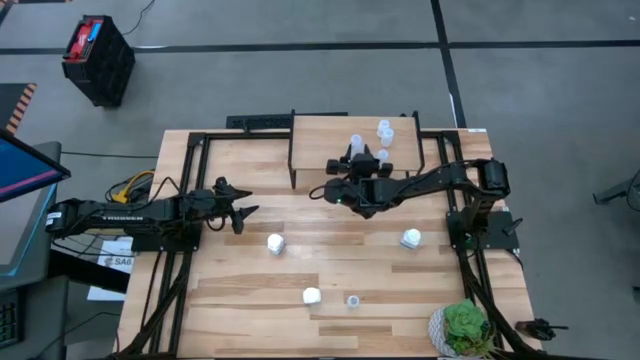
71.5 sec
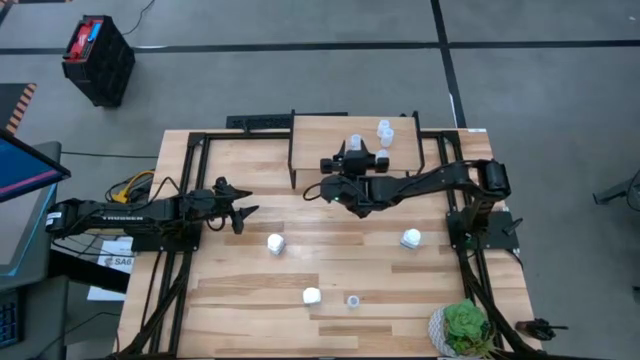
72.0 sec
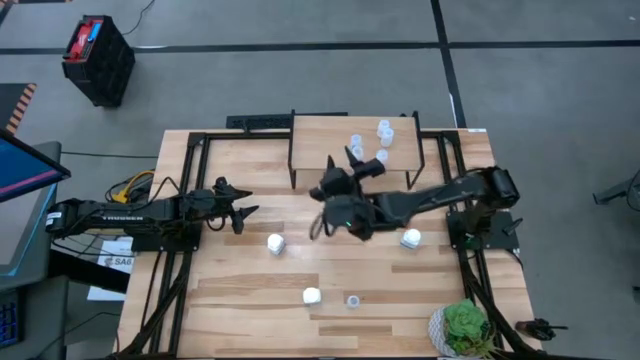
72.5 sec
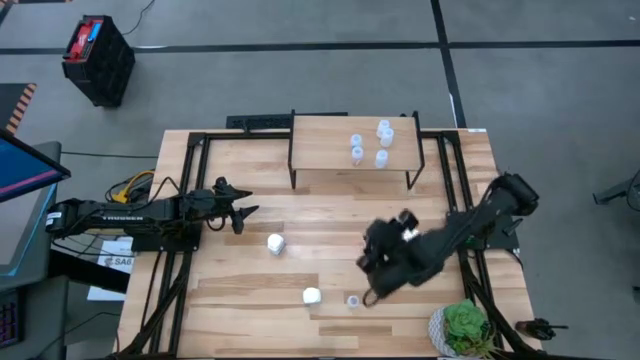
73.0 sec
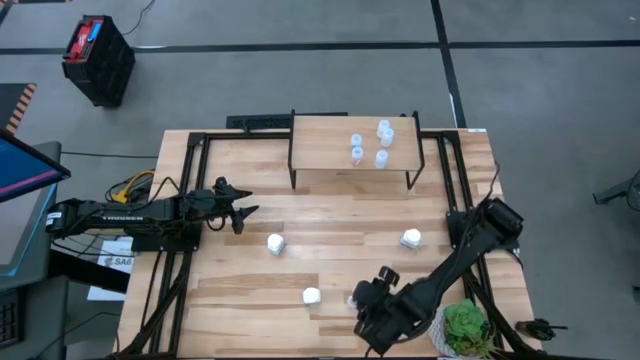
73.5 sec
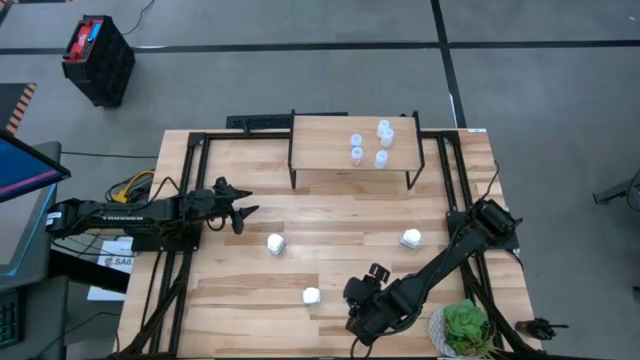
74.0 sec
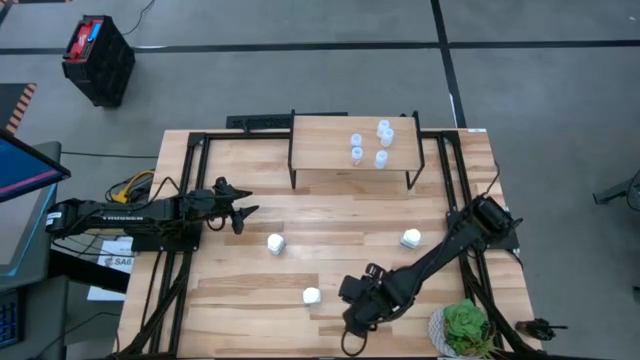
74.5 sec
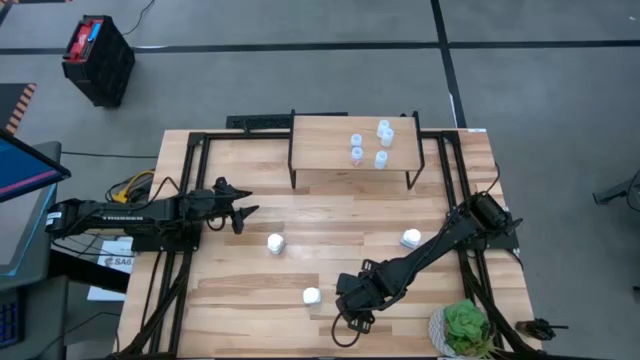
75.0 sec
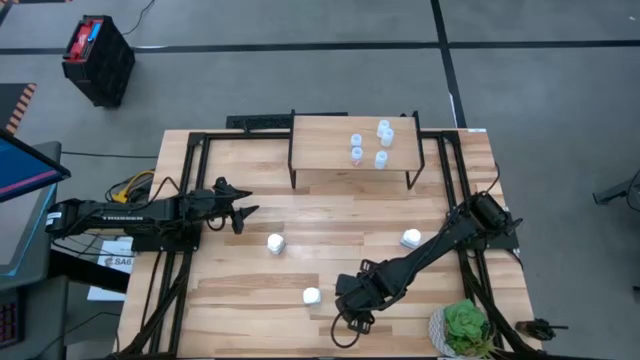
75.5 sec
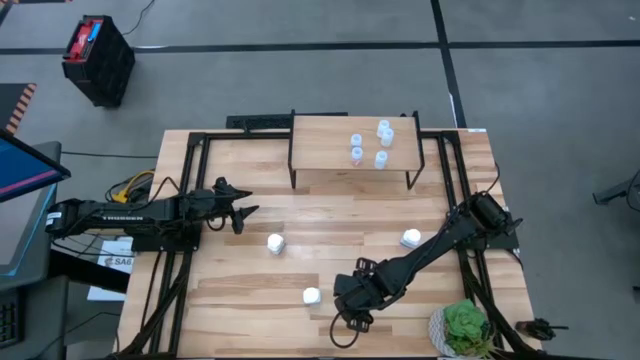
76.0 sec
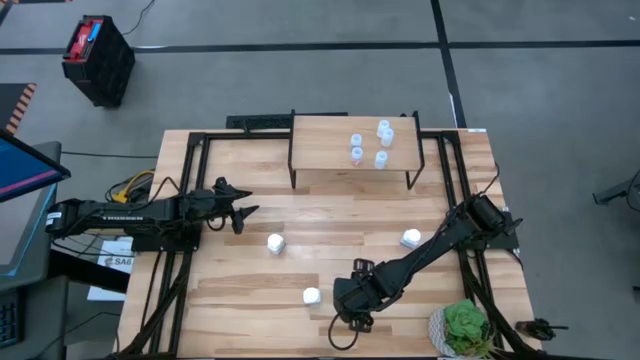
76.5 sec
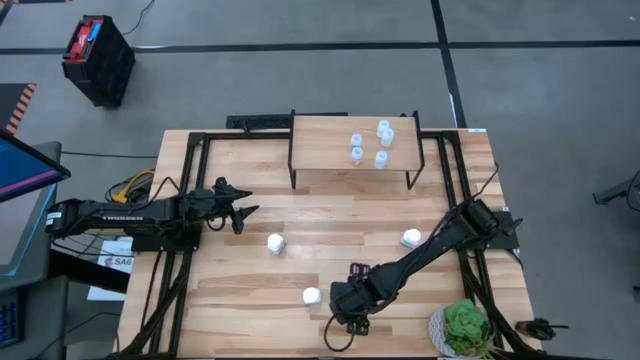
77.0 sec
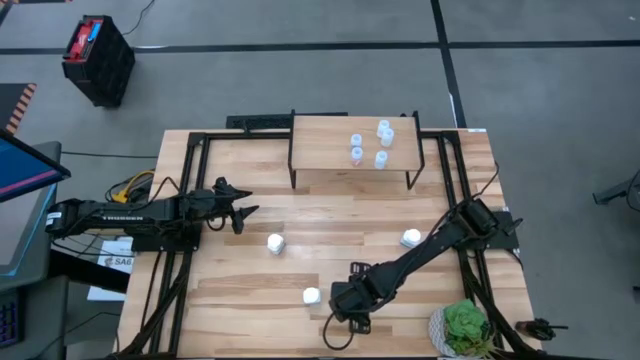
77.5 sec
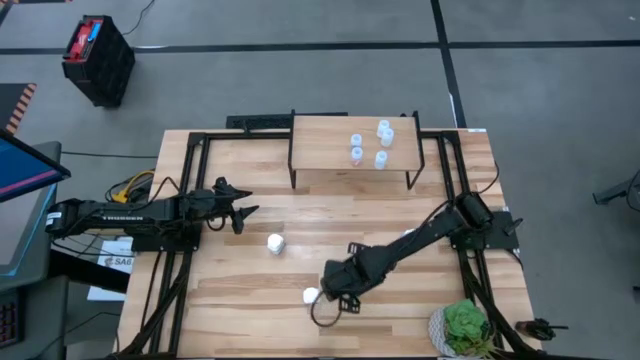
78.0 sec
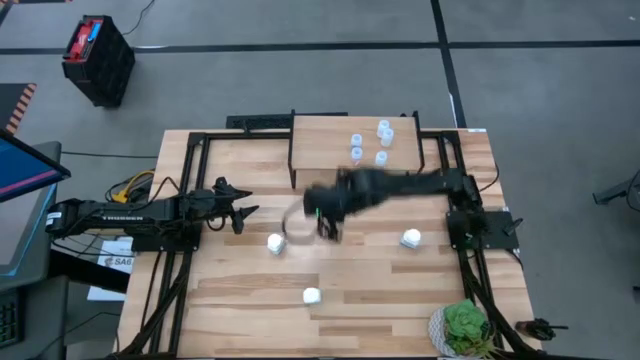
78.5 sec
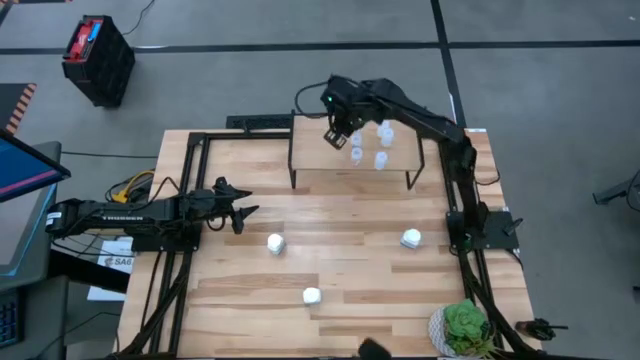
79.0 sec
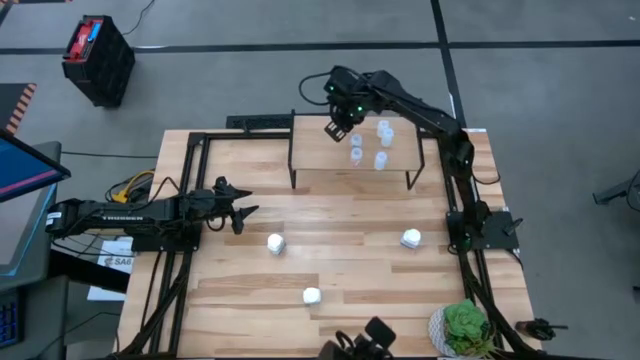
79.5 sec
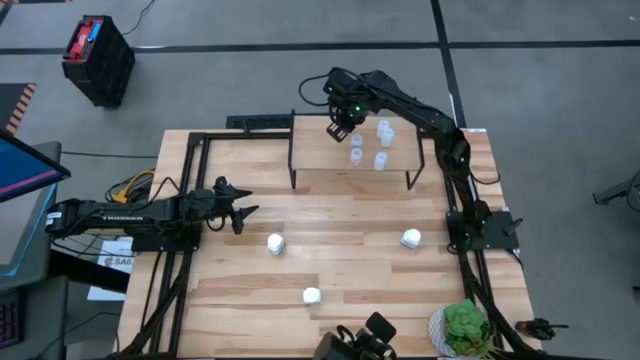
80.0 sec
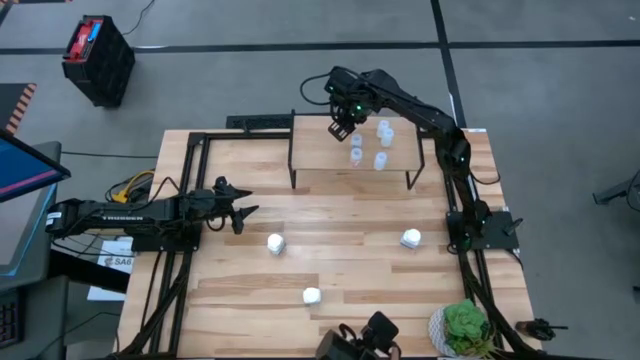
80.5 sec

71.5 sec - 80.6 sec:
Task: Pick and place medicine bottles onto shelf by color
Put the transparent pill bottle on the shelf

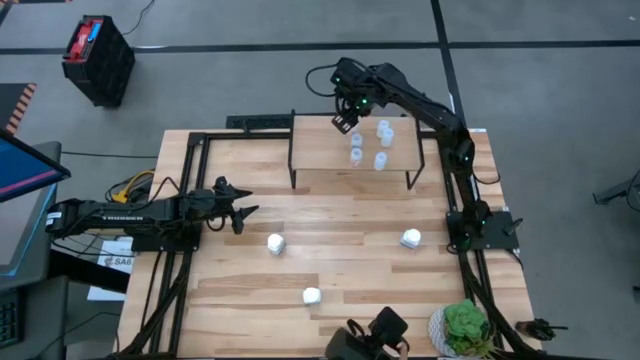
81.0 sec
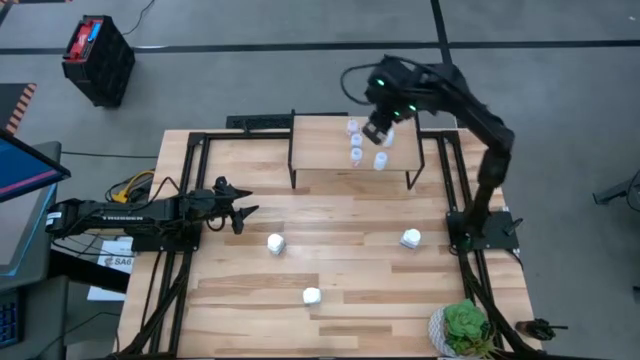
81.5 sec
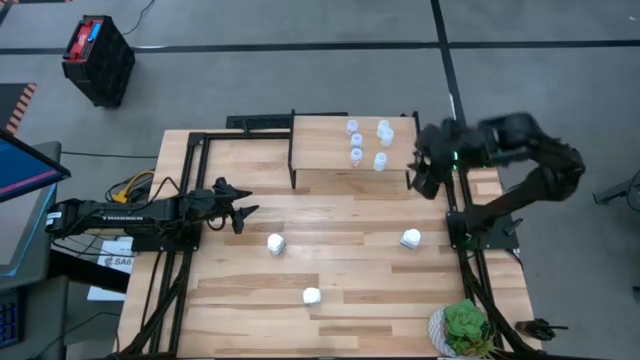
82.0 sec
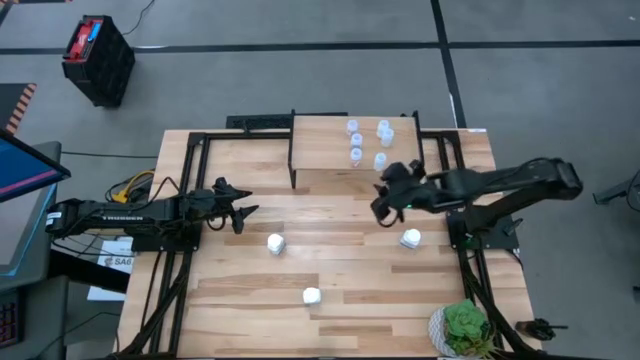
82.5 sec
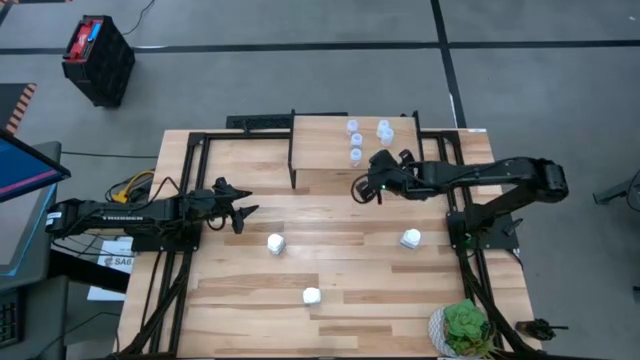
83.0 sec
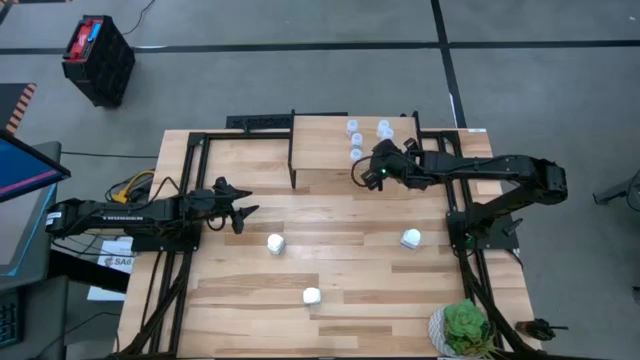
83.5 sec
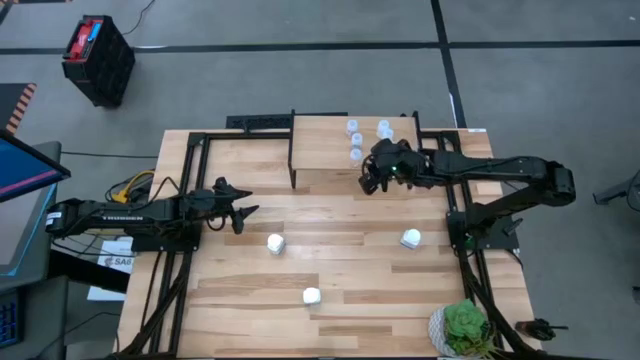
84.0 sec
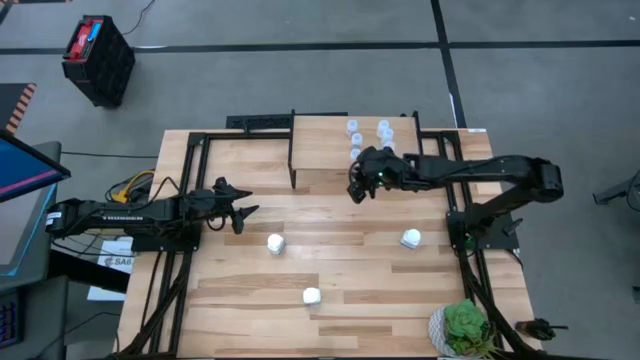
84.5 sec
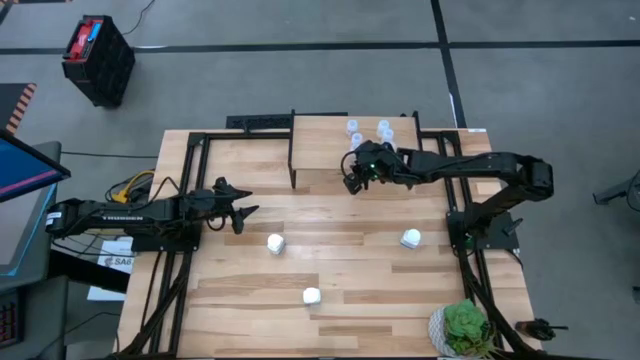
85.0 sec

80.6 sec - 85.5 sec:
Adjust the pill bottles on the shelf

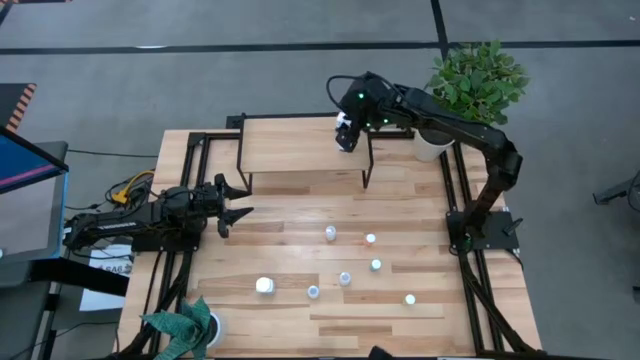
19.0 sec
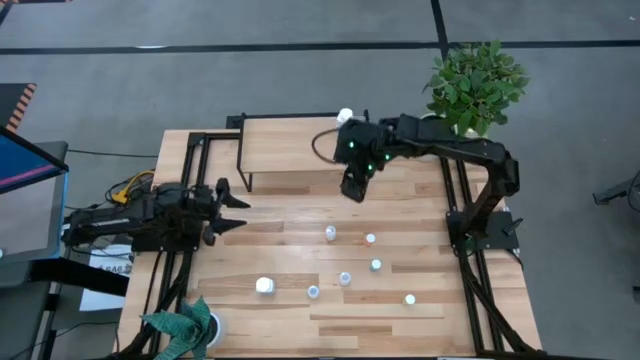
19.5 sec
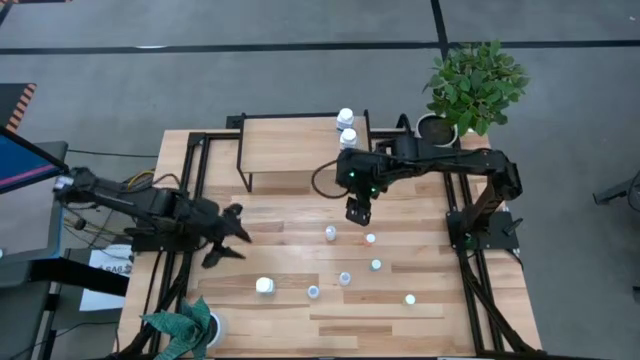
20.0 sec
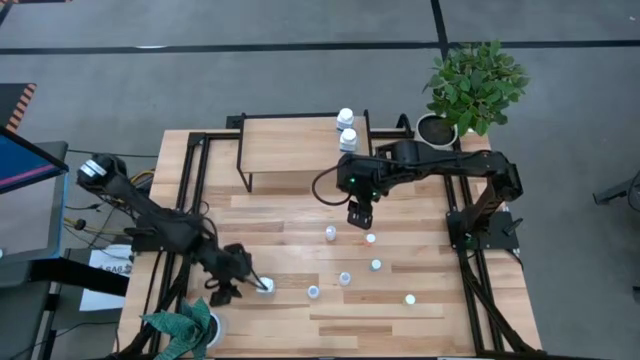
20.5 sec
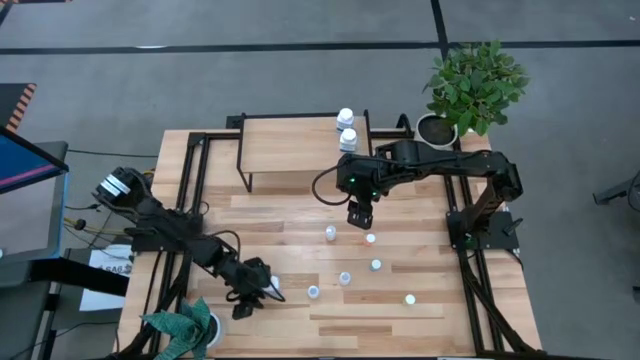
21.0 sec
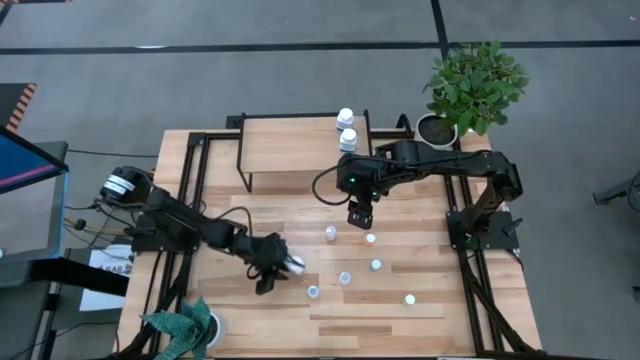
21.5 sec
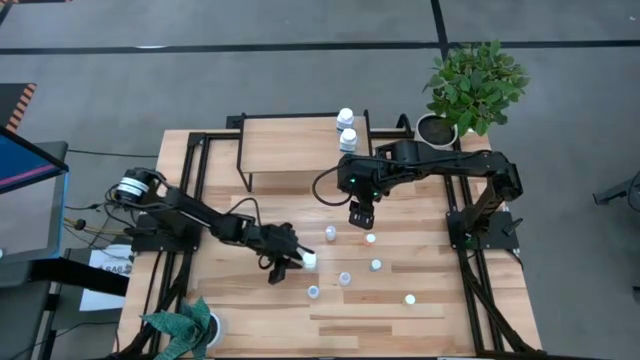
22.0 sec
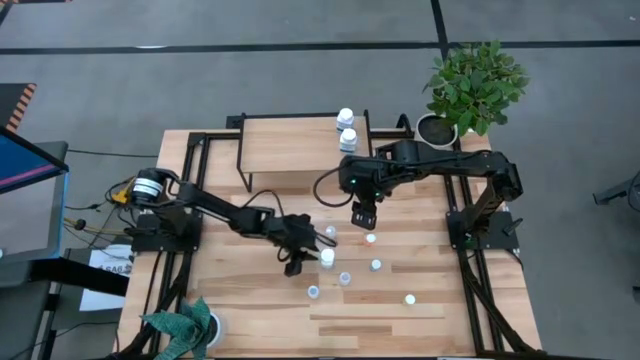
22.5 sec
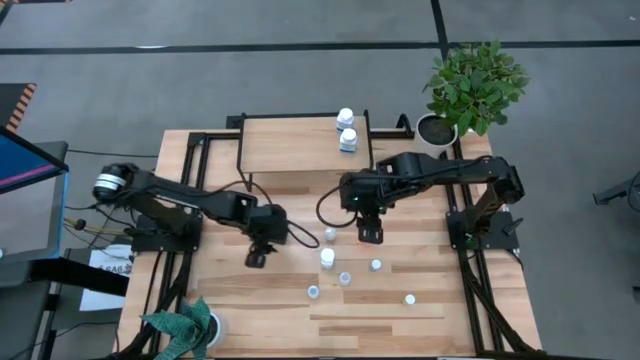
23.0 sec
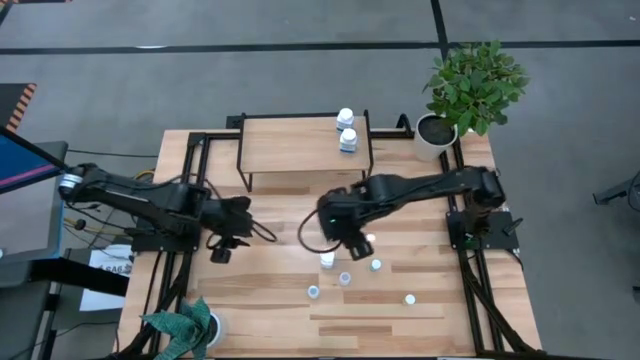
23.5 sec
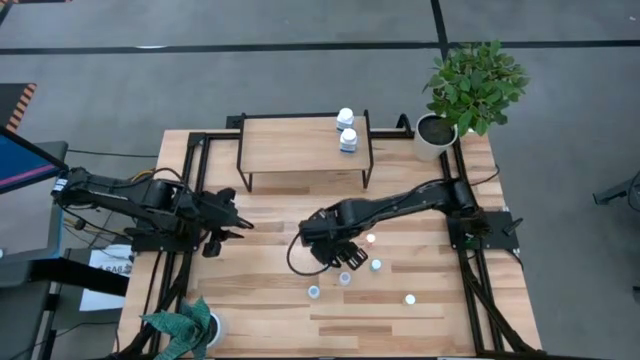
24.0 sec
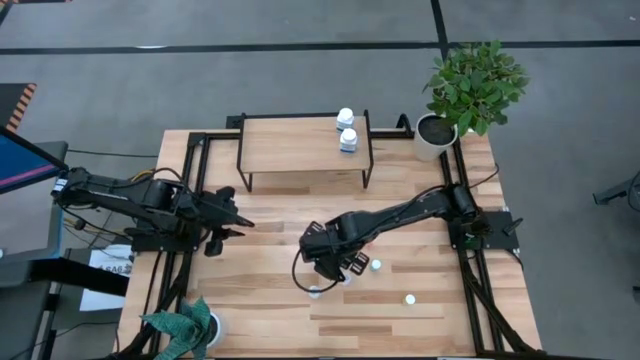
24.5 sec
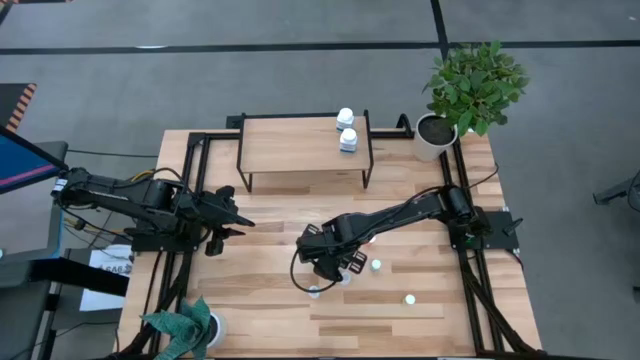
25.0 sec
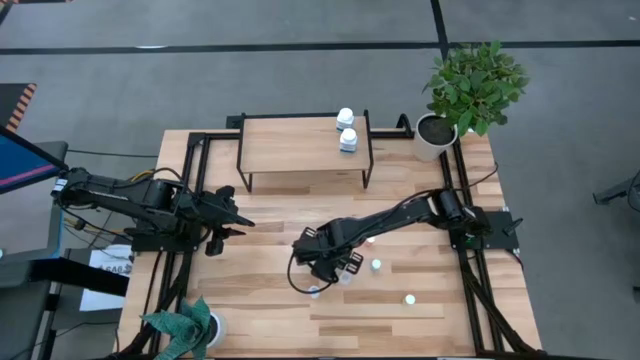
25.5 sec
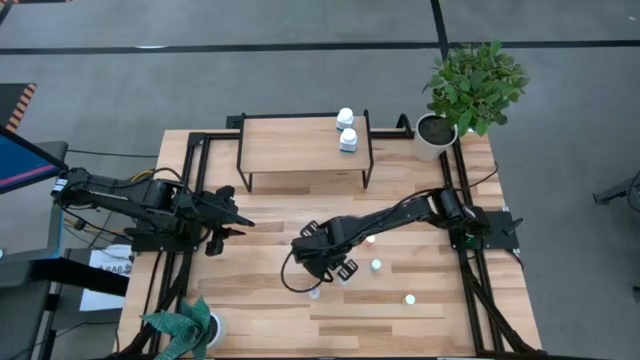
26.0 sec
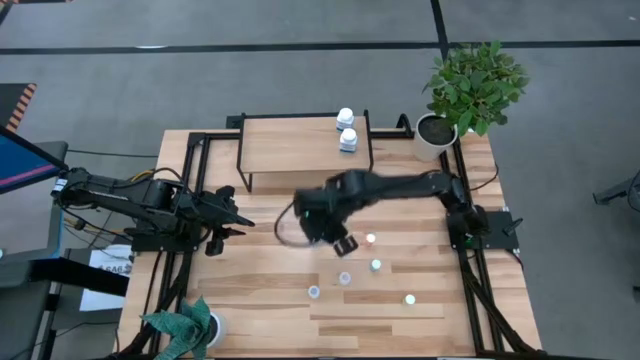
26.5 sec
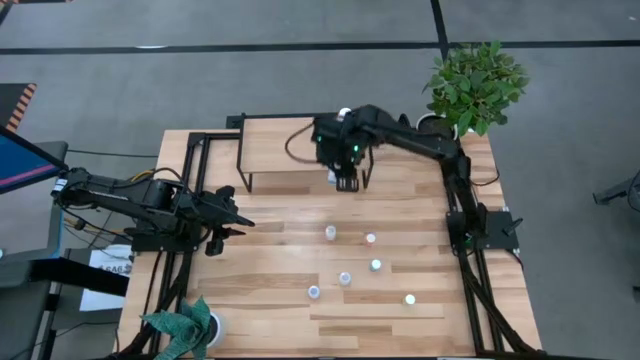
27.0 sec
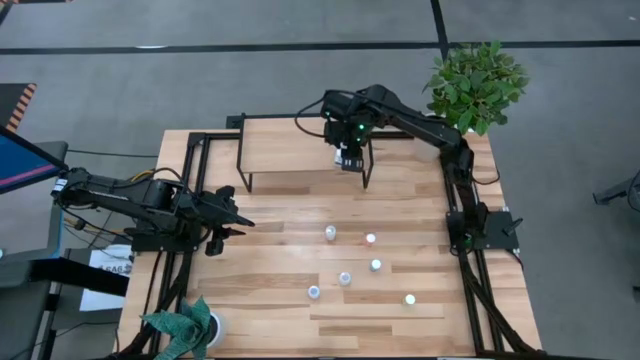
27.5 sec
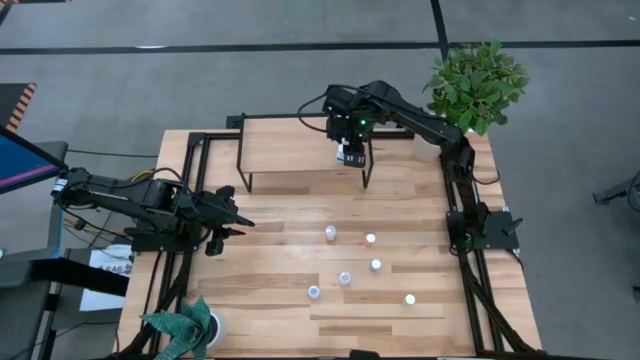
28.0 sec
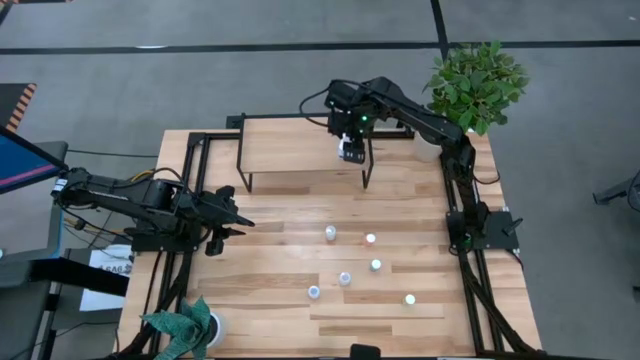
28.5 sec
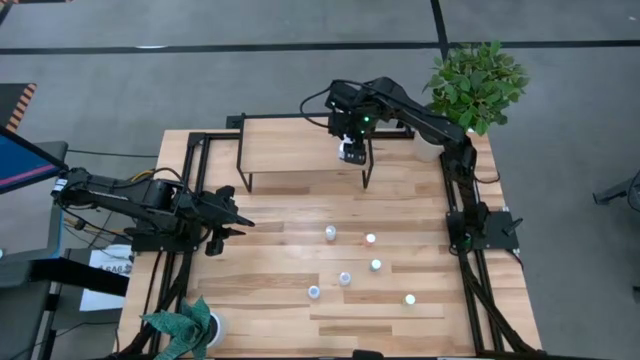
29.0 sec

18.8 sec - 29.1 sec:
Task: Pick and place medicine bottles onto shelf by color
Put the white pill bottle on the shelf aligned with other white pill bottles
